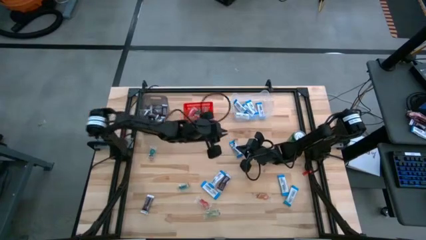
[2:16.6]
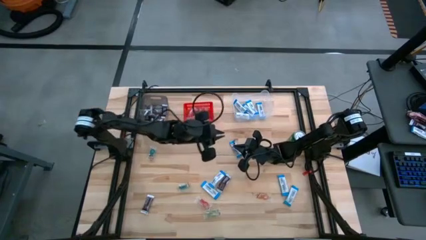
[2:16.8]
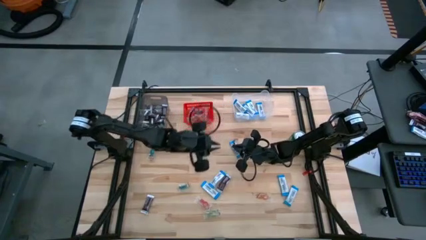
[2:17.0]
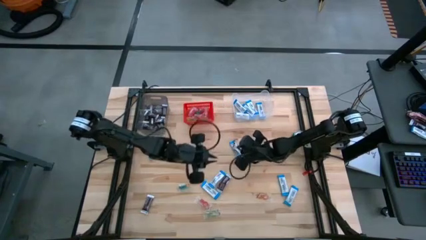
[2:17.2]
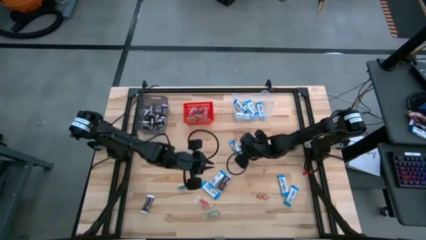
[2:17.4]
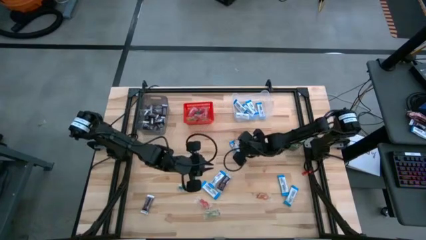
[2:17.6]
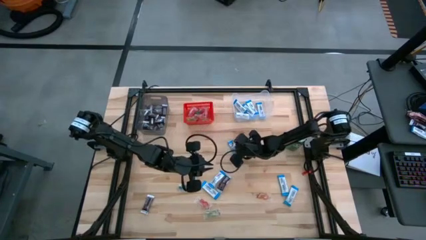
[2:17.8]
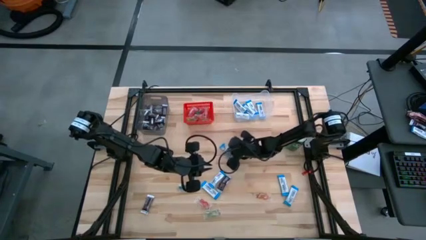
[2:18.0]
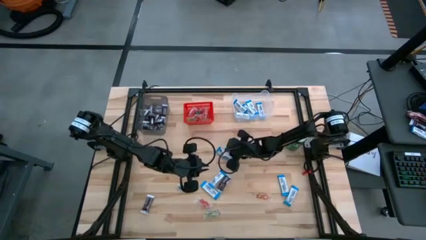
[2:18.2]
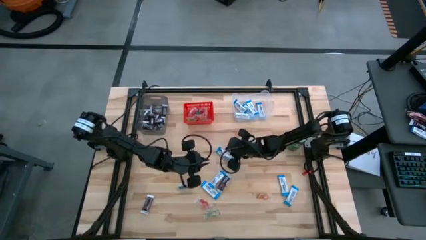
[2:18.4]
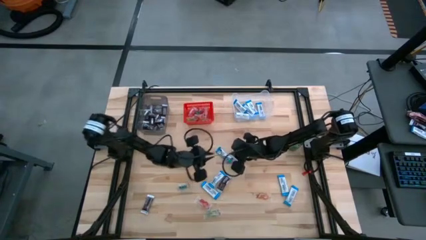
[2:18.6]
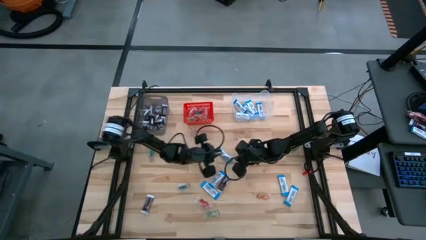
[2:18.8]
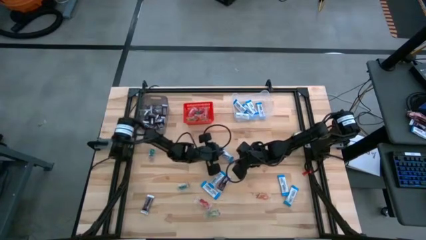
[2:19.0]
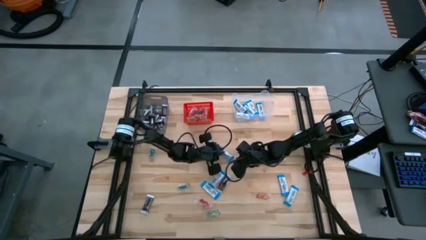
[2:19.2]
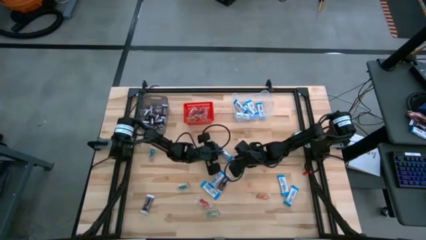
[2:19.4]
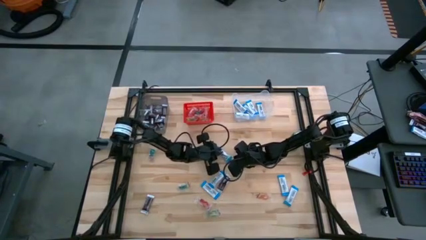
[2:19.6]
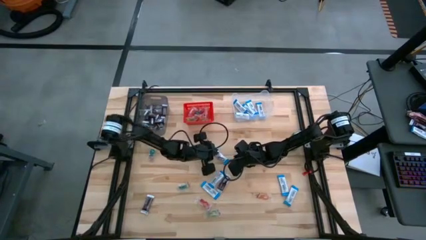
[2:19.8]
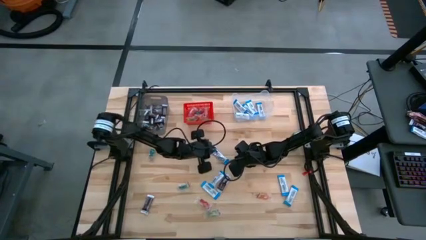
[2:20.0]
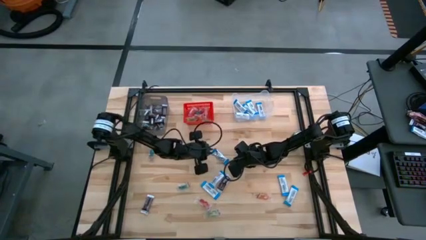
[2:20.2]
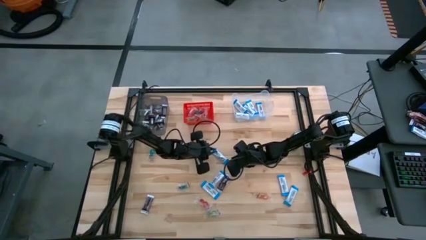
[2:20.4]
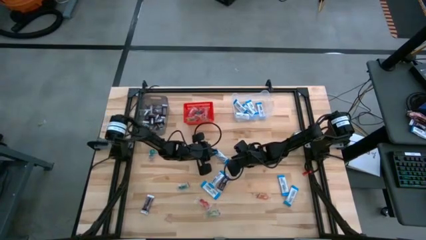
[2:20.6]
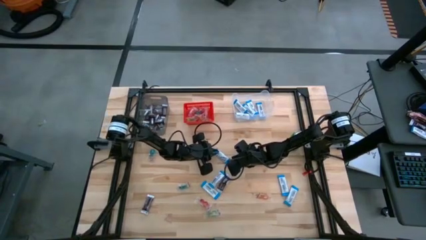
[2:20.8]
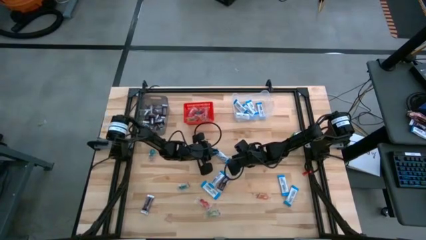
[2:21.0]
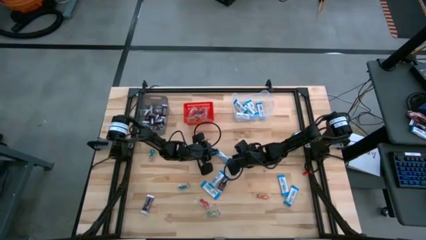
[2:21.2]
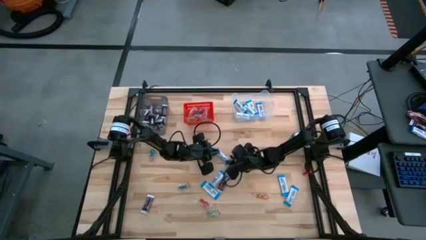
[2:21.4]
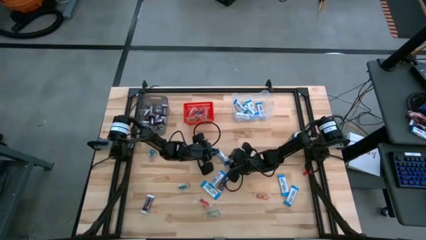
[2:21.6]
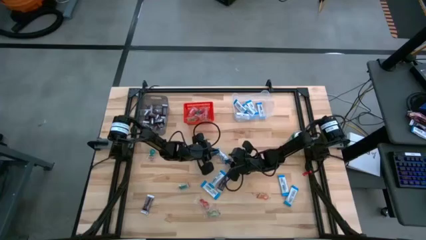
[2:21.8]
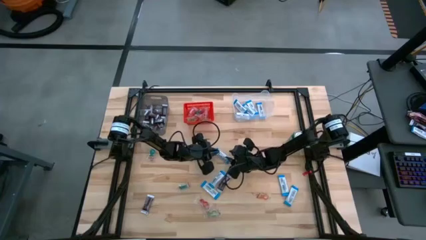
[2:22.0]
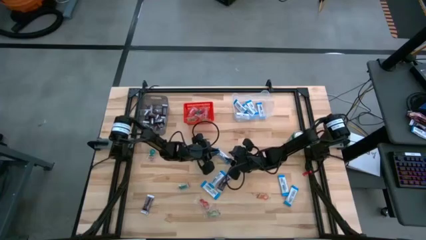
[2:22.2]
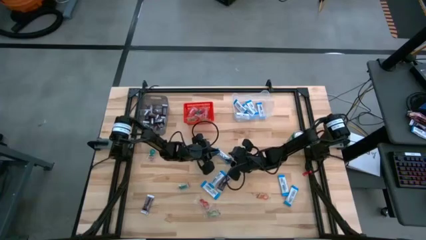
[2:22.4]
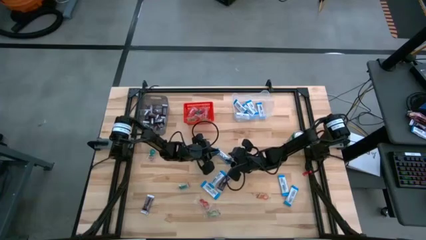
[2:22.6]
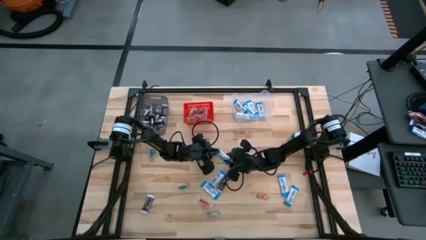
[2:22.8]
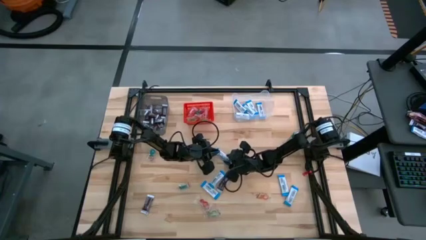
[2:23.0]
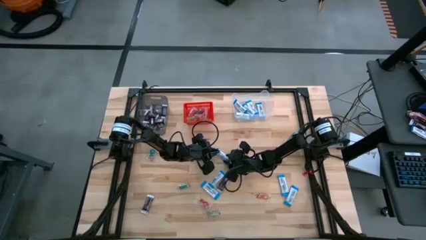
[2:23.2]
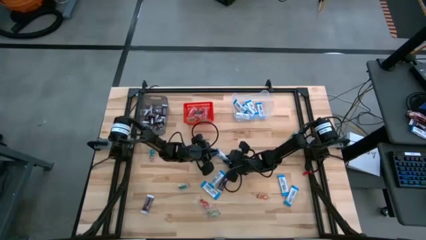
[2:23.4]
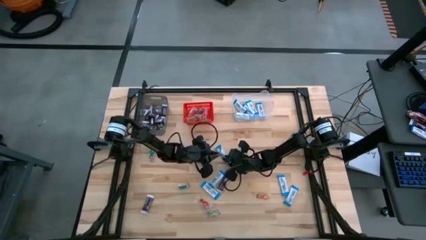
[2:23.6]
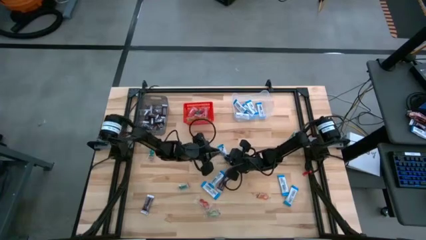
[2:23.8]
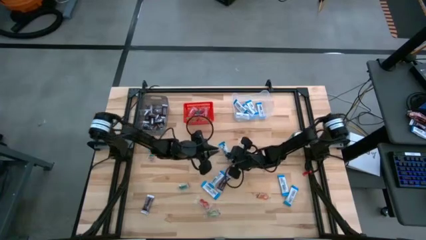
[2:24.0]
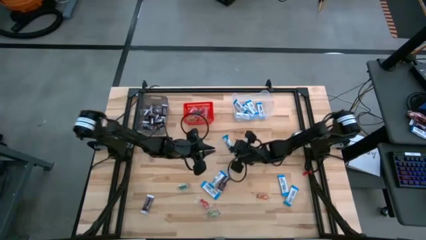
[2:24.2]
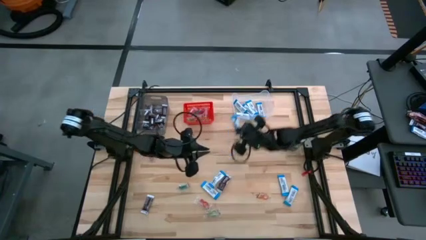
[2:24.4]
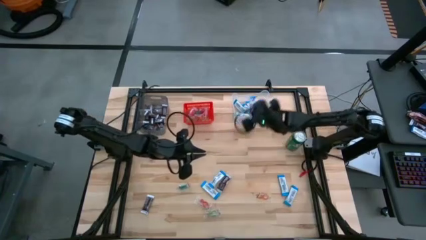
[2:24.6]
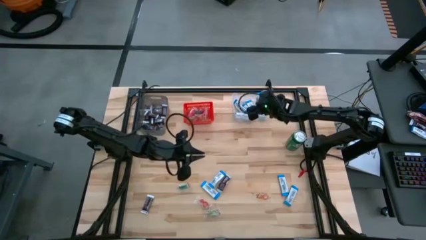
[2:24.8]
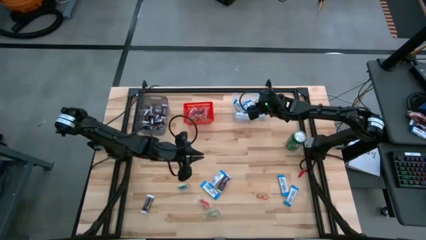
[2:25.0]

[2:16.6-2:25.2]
Task: Sort candy
Put the white chocolate into the transparent bin

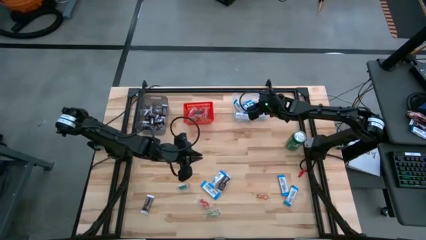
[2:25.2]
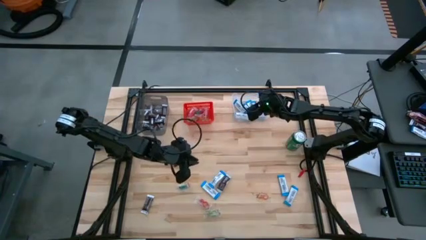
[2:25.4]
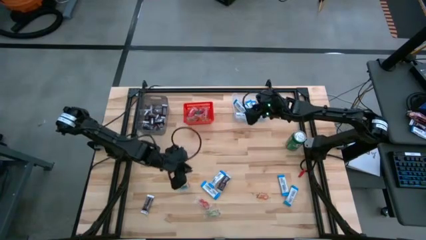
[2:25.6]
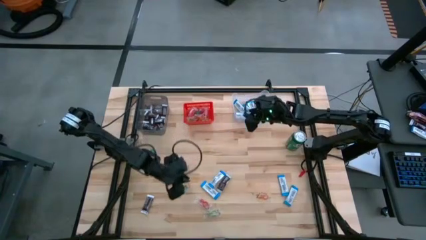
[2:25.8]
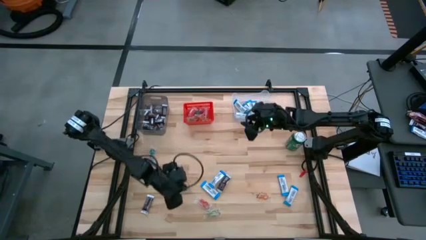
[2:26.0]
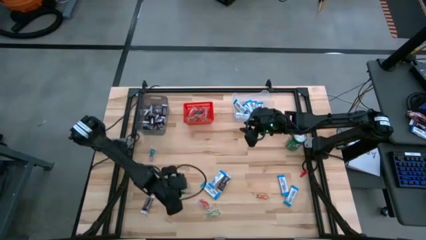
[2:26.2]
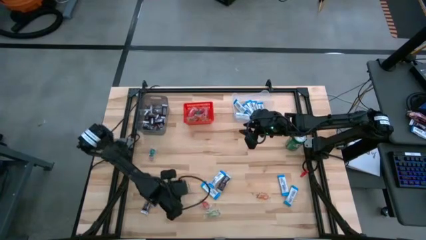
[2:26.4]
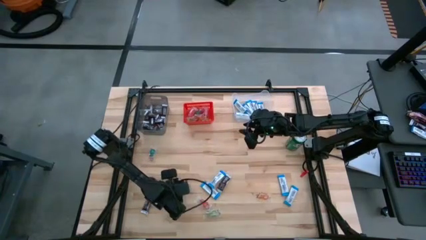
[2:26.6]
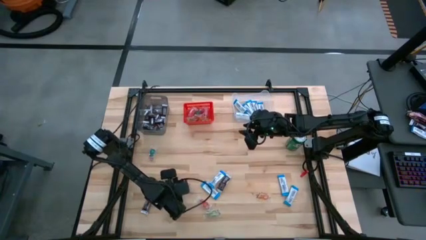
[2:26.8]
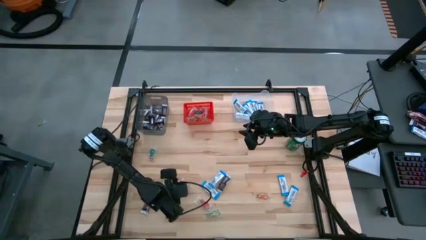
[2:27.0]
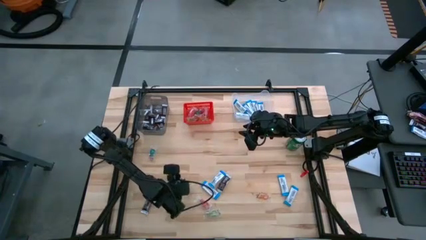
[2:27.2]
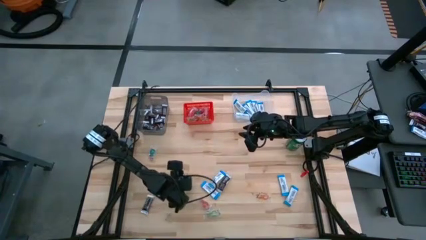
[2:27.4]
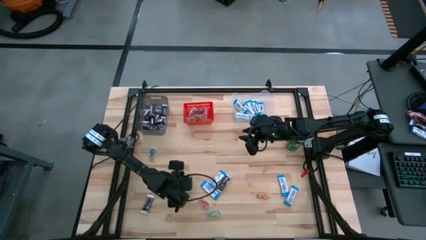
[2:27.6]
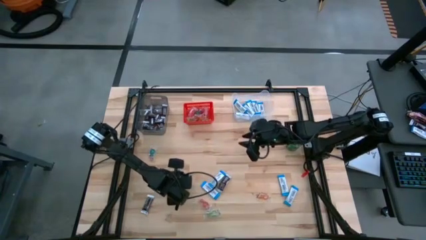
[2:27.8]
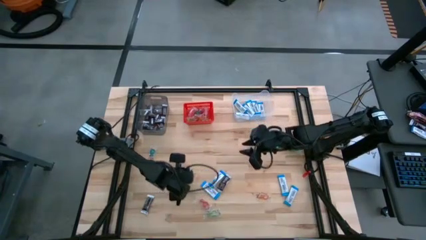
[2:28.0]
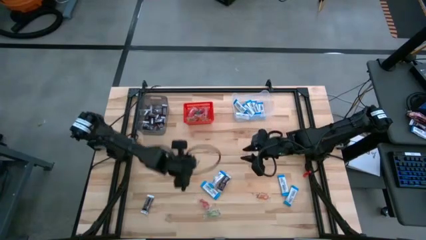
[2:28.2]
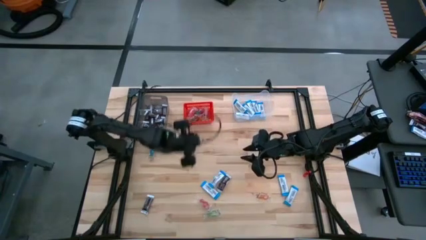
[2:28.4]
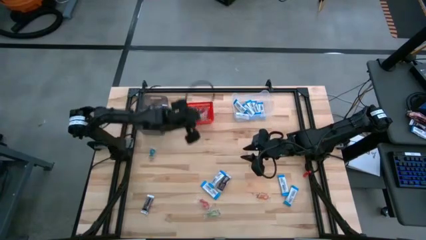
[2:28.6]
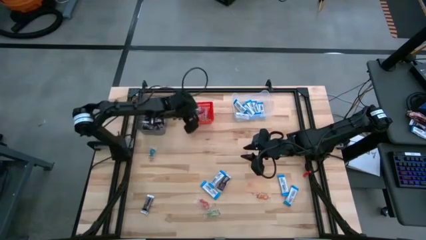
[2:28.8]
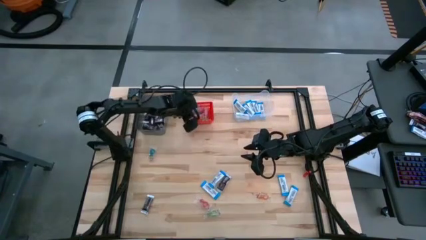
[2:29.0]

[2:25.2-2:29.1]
Put the blue gummy into the red bin

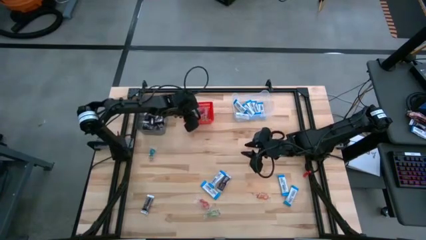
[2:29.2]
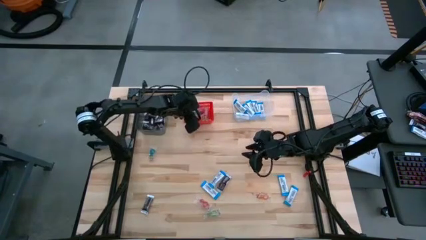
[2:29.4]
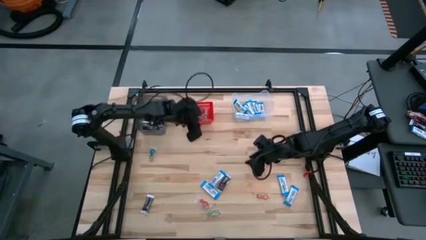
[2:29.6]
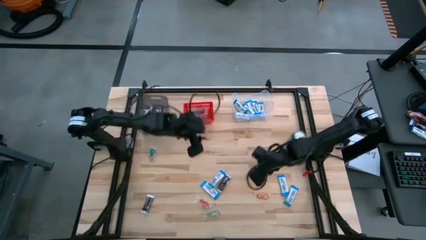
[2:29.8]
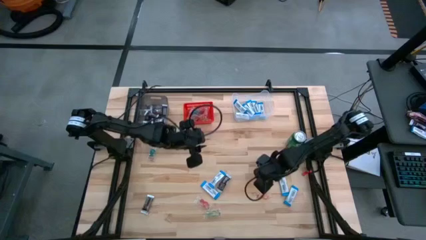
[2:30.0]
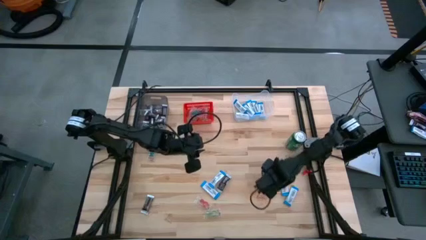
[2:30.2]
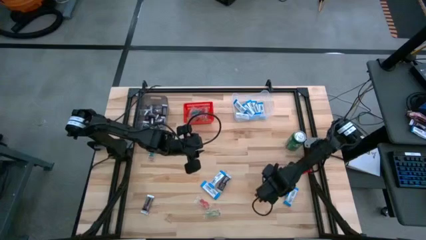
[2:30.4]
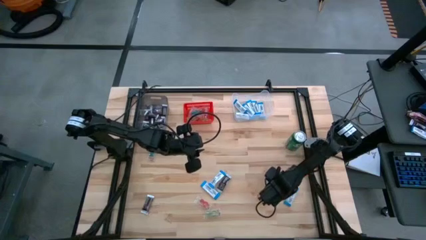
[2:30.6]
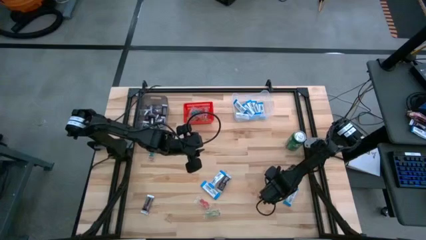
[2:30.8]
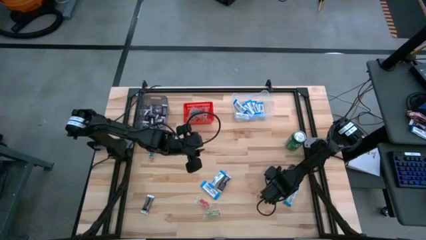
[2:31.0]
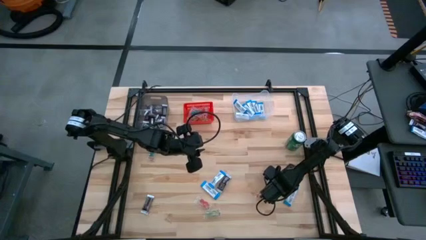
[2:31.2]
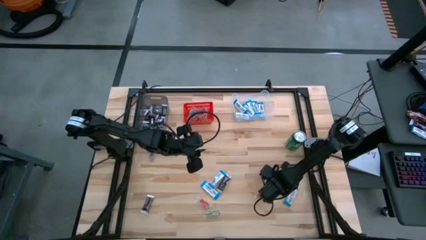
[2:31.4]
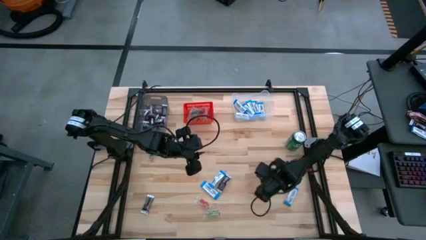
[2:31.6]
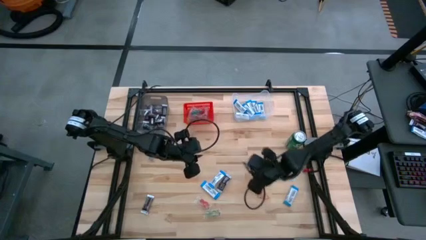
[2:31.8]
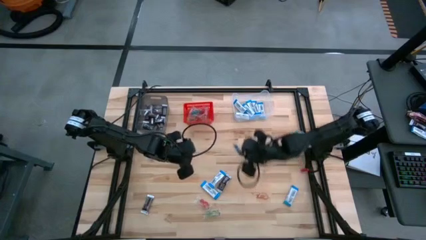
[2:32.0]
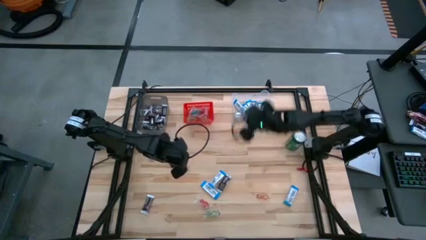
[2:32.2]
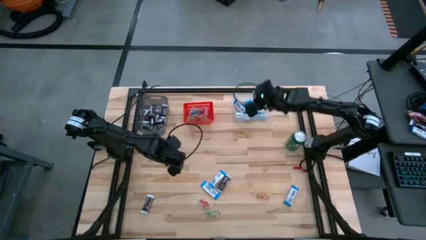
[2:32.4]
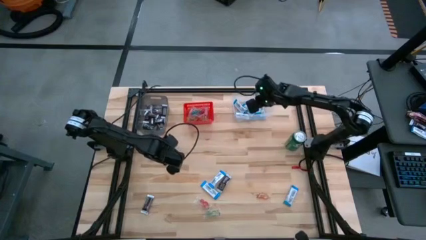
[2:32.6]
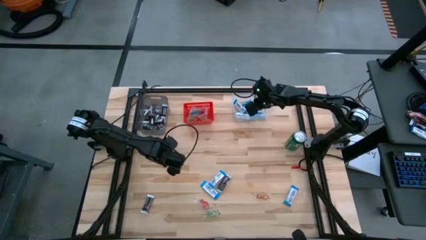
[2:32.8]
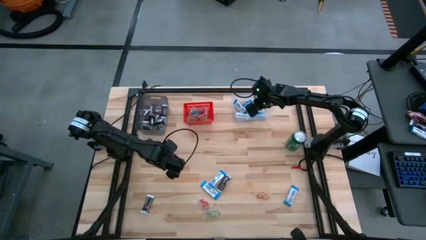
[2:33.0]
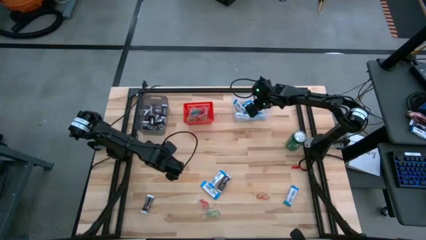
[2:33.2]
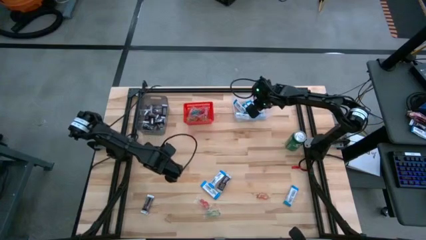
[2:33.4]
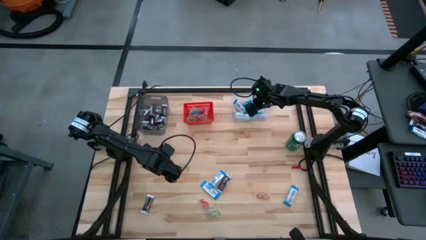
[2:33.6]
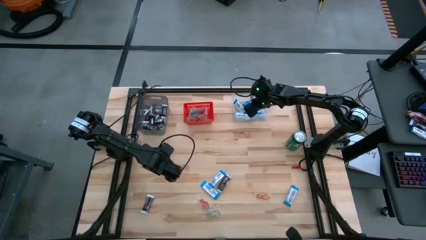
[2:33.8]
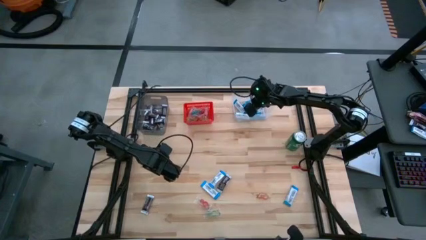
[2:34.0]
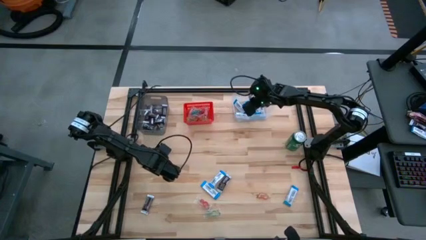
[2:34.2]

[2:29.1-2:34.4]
Put the white chocolate into the transparent bin

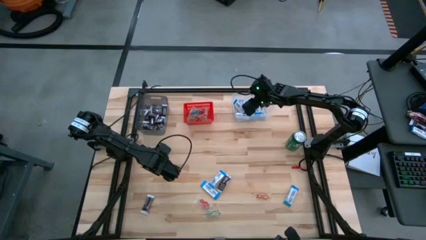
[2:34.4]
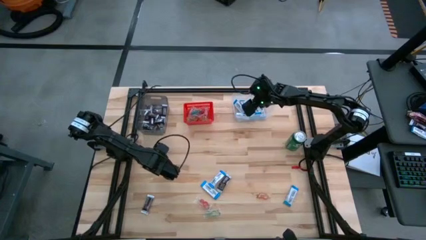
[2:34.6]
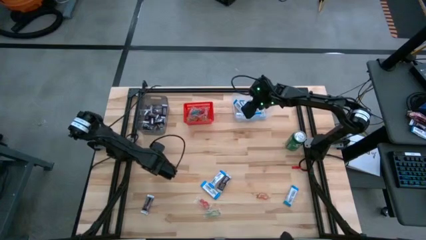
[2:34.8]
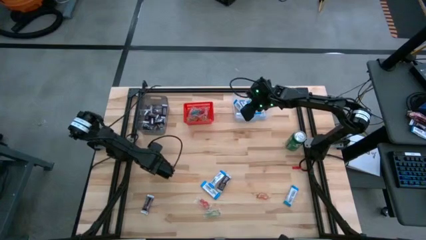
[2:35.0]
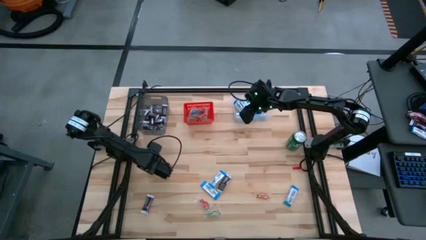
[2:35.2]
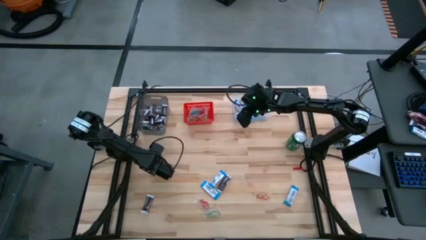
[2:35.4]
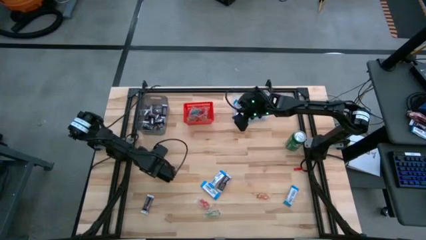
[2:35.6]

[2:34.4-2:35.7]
Put the blue gummy into the red bin
